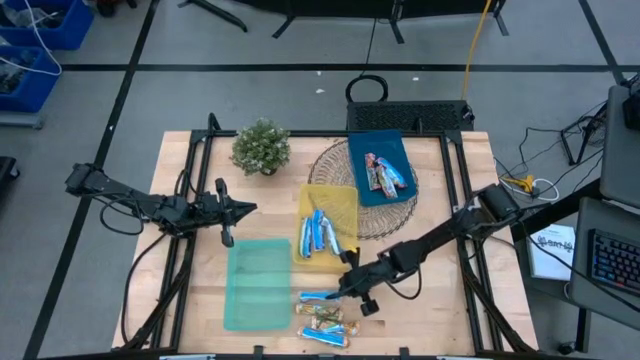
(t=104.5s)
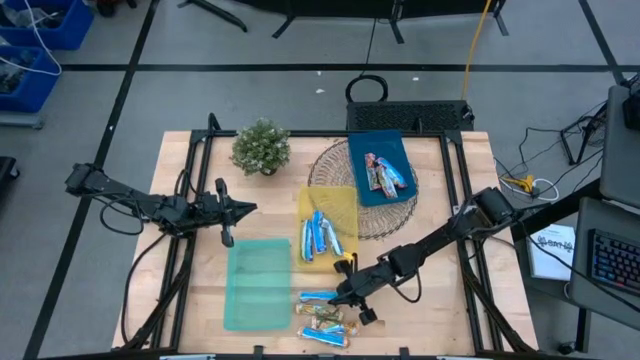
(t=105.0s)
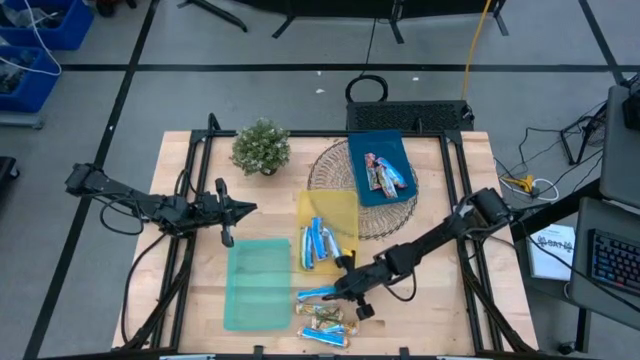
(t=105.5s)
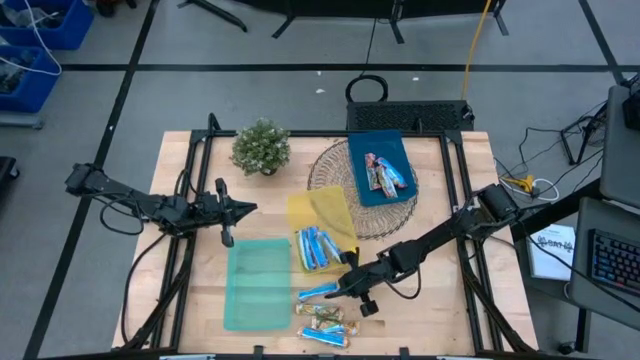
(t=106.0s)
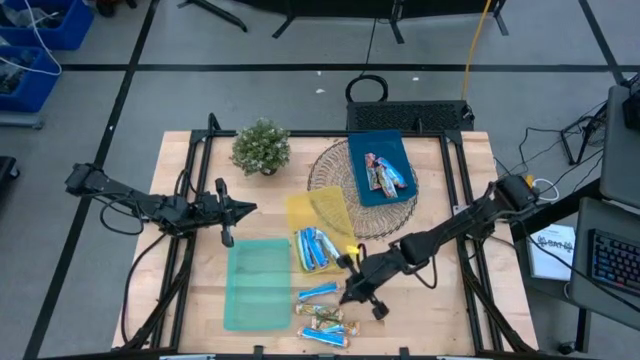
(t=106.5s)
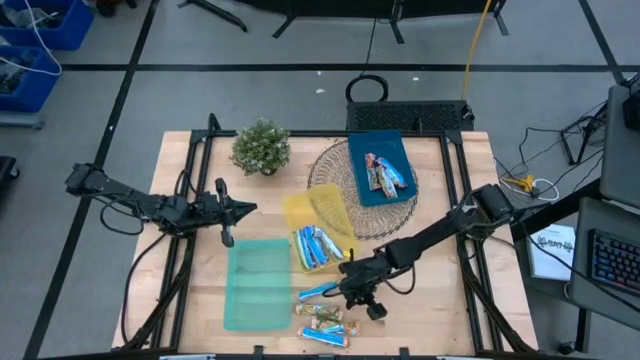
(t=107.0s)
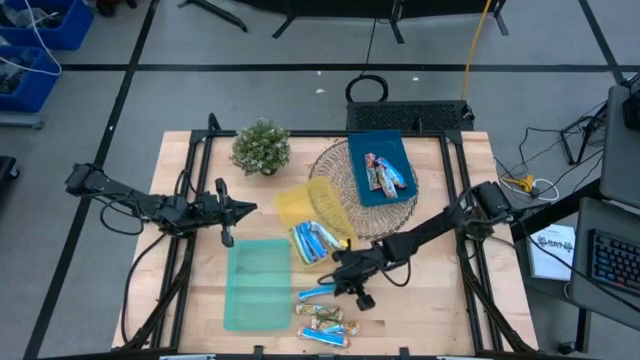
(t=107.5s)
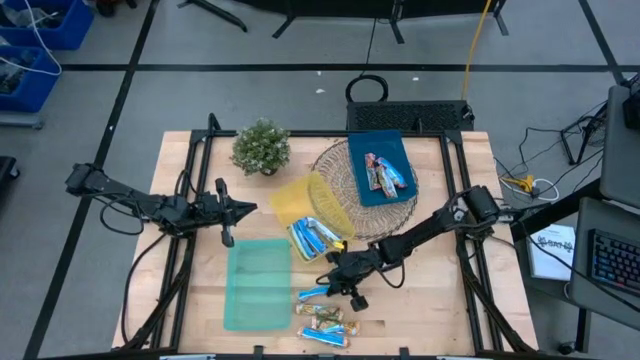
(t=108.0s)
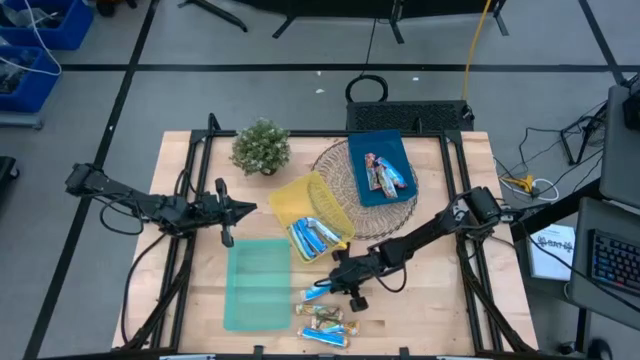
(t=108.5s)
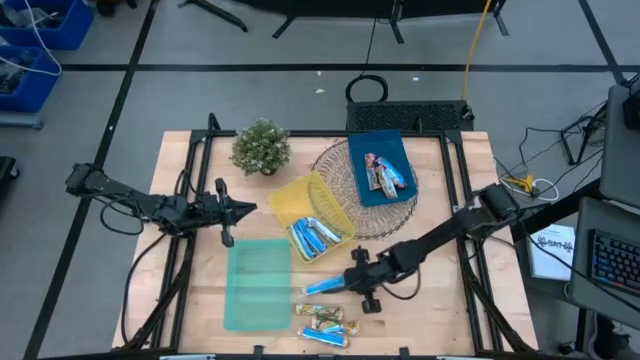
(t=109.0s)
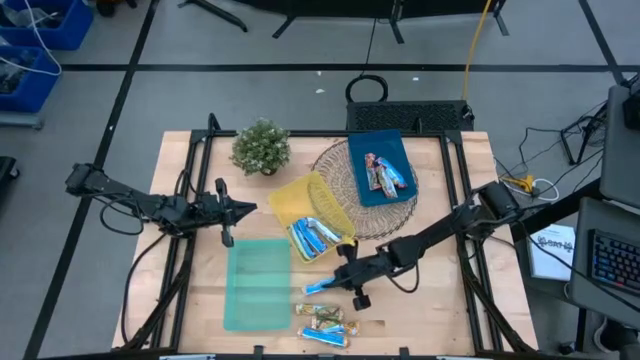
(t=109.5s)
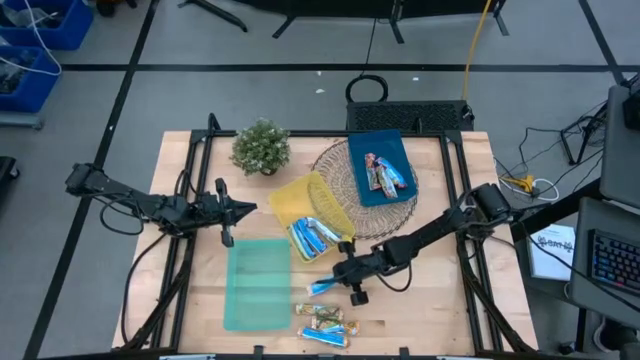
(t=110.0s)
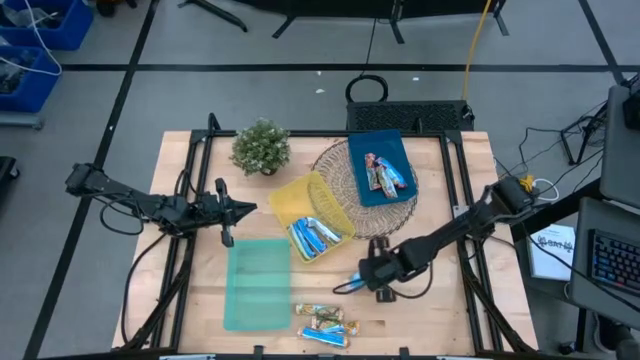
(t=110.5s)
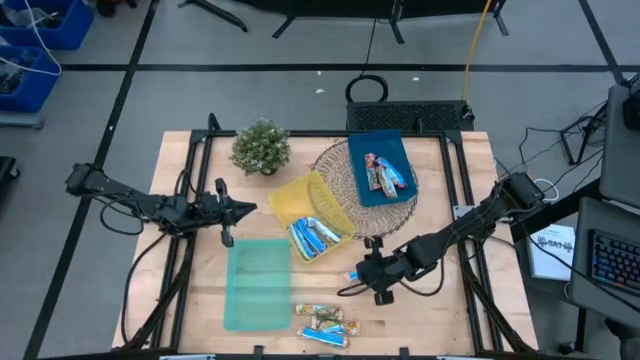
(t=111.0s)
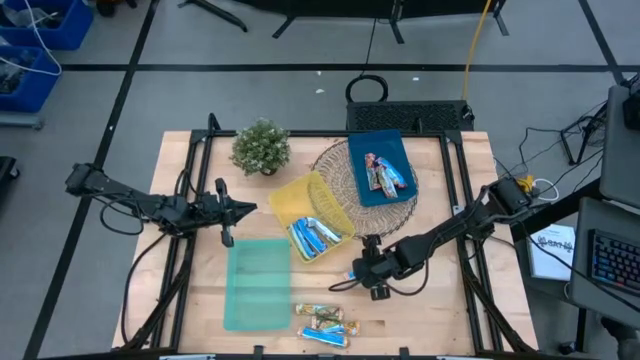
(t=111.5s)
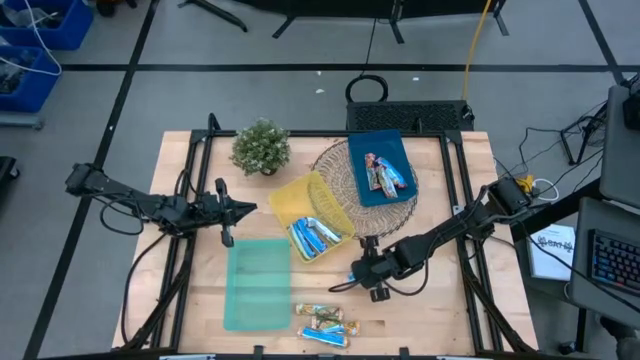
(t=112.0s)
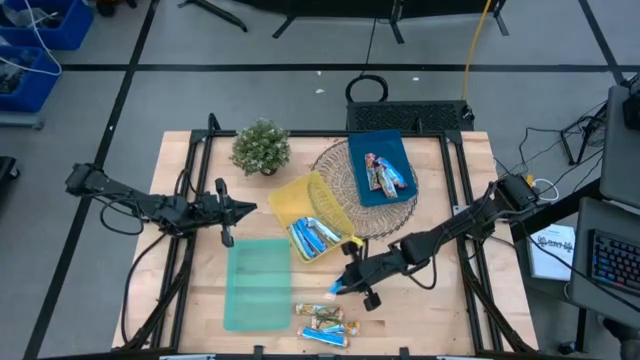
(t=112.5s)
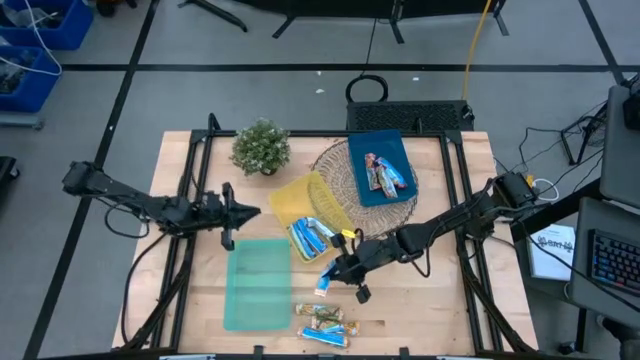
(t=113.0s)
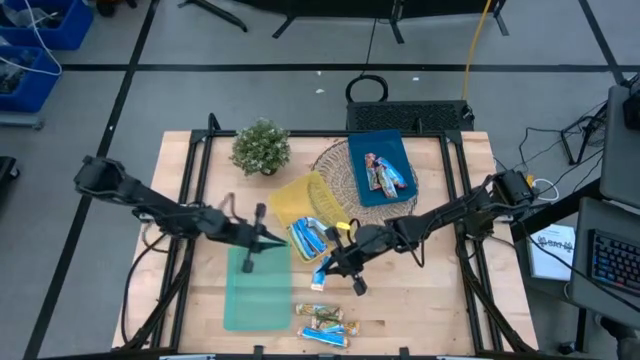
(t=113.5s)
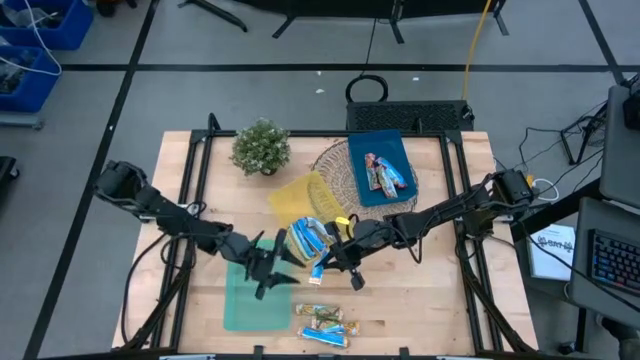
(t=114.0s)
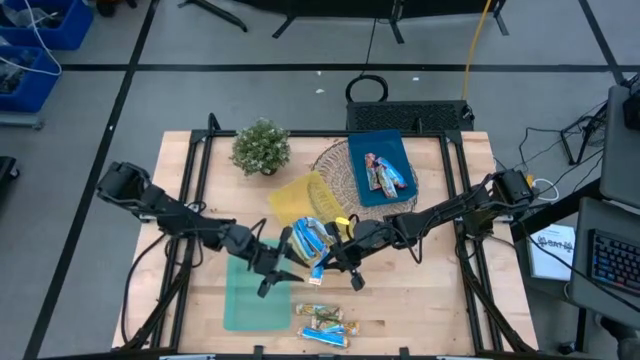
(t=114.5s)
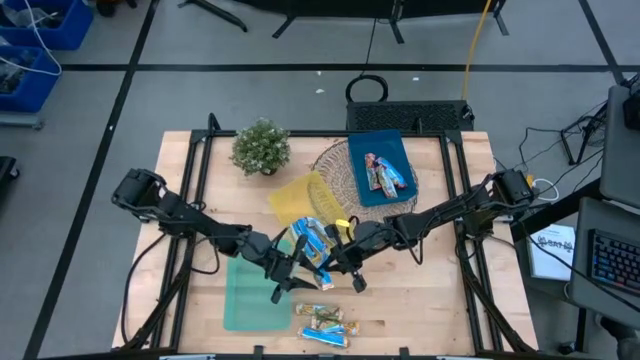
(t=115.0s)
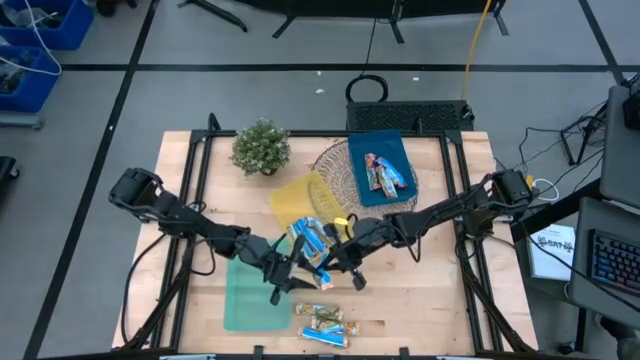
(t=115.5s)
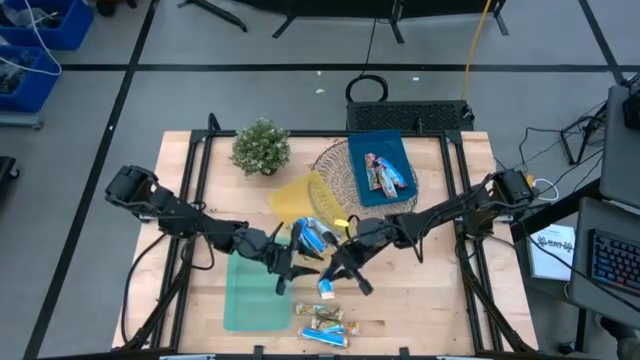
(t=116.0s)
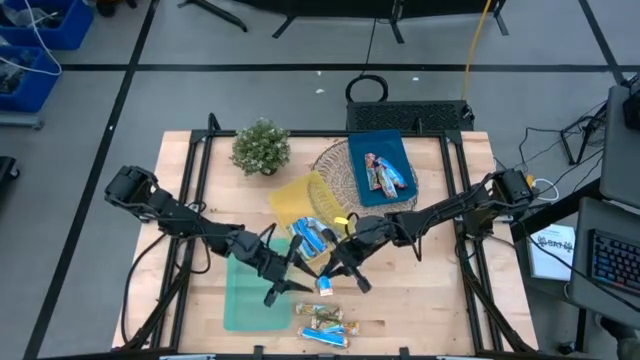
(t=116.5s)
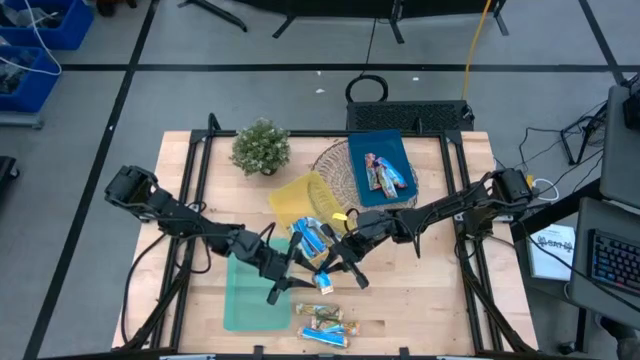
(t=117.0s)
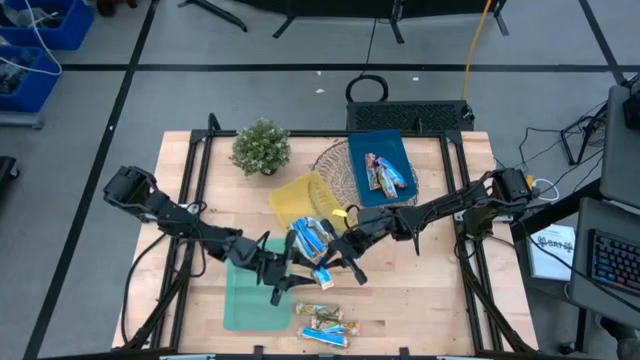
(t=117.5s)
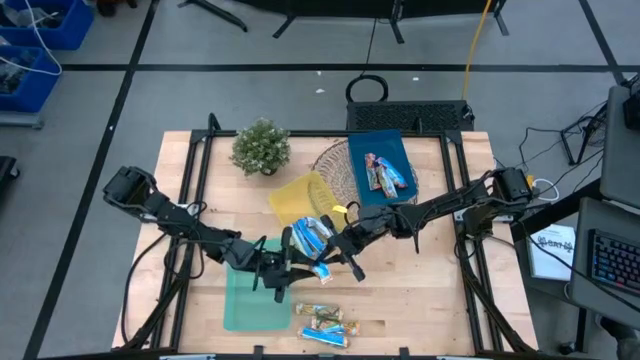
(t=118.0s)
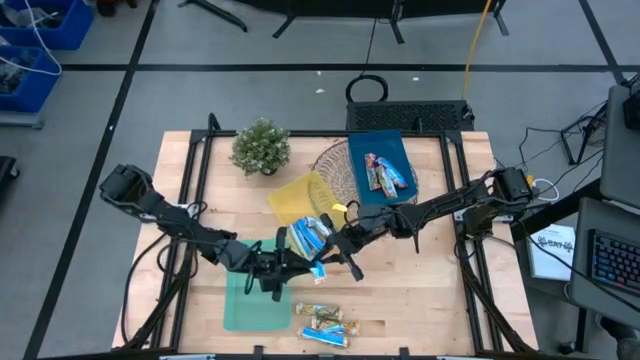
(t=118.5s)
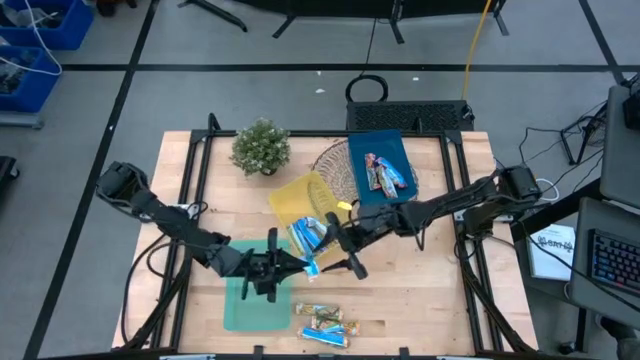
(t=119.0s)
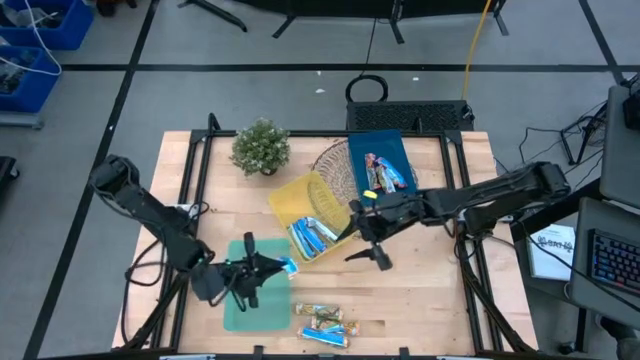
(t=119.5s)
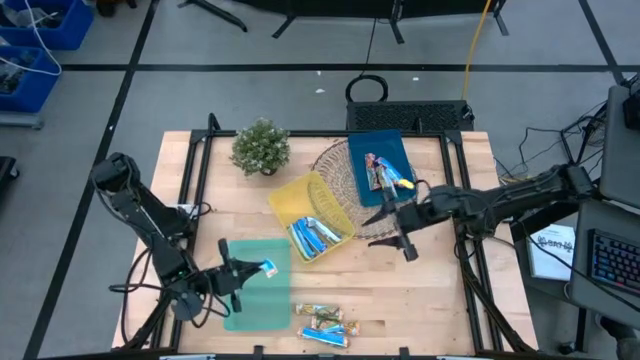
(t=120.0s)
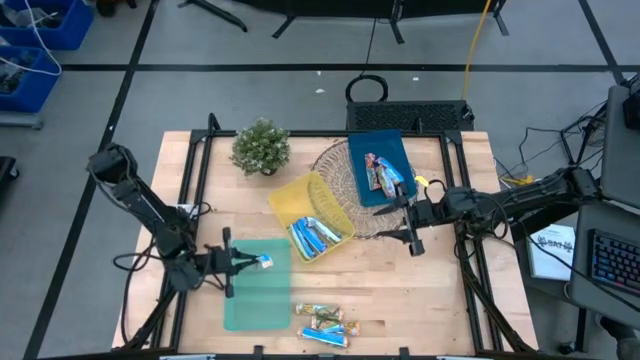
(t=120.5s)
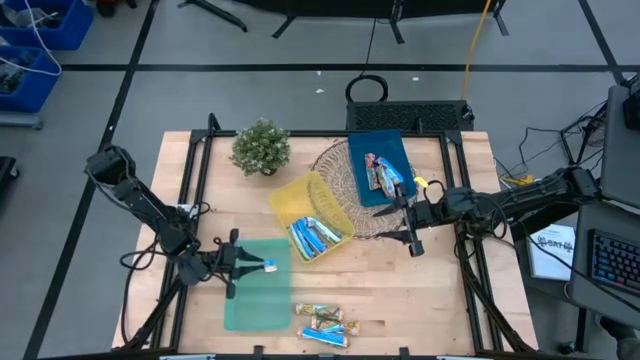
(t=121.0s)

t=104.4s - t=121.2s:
Task: Pick and place Granola Bars by type
Put the yellow granola bar into the green bin

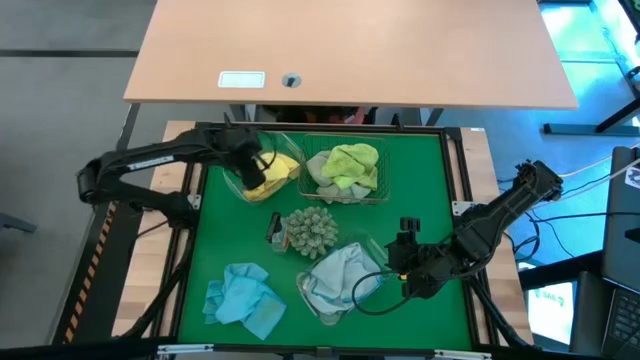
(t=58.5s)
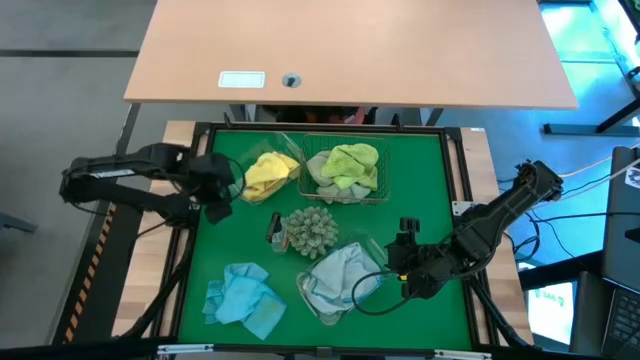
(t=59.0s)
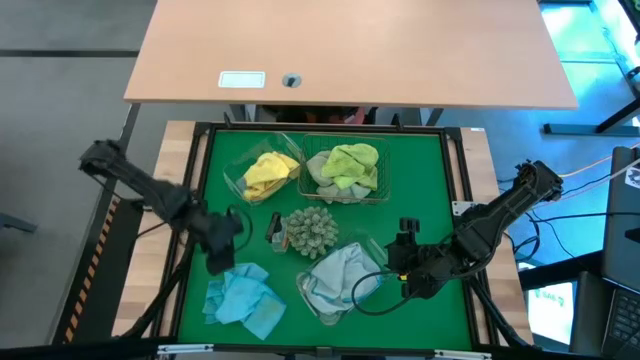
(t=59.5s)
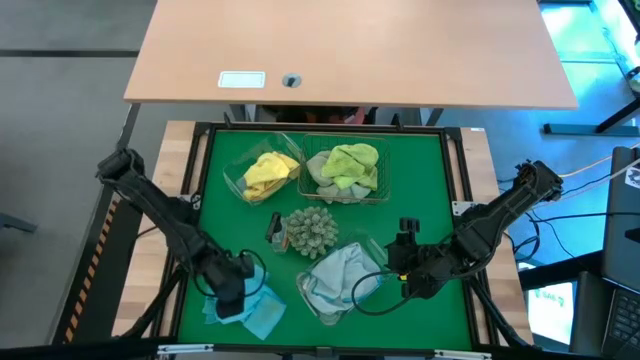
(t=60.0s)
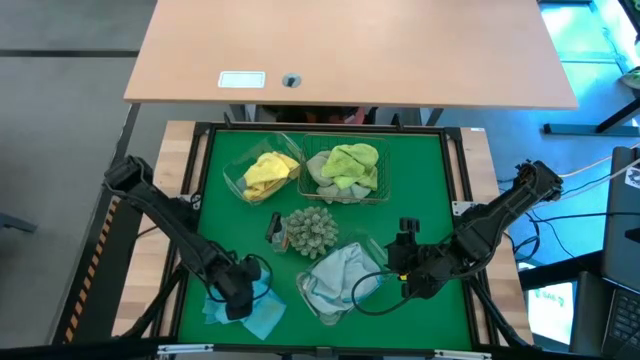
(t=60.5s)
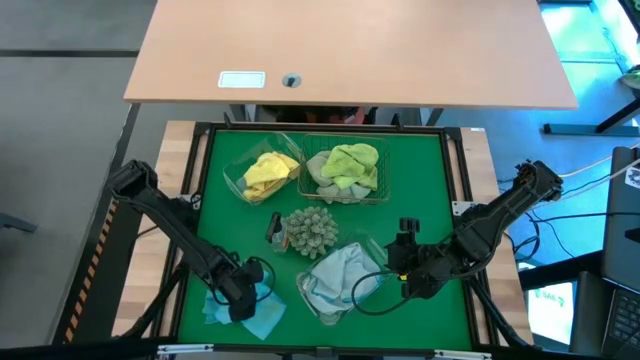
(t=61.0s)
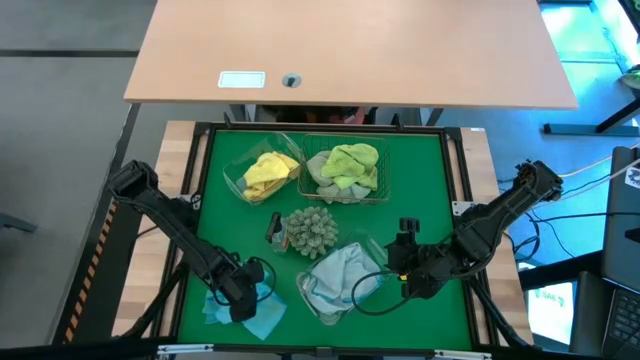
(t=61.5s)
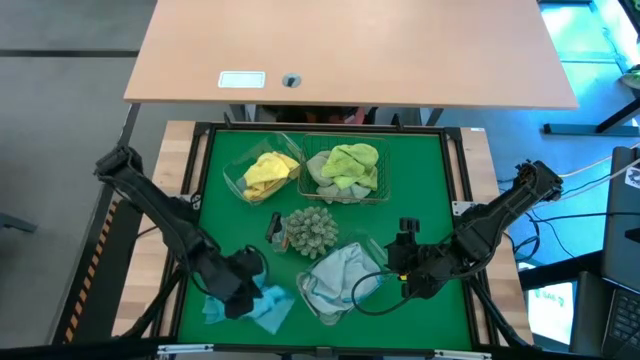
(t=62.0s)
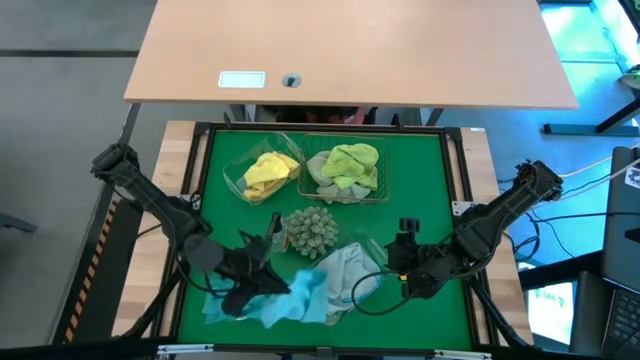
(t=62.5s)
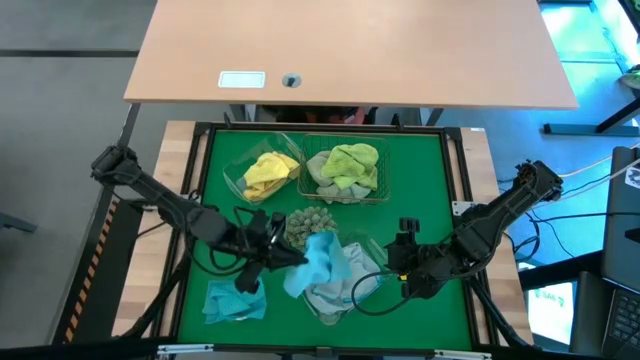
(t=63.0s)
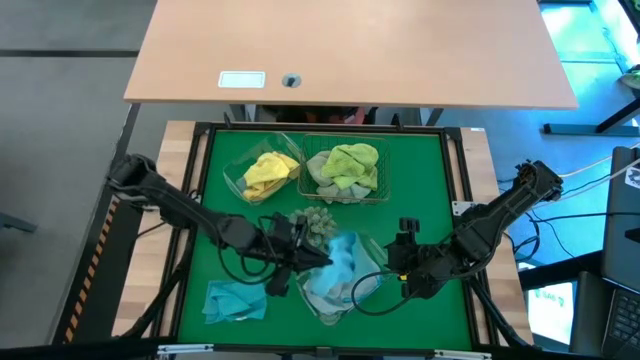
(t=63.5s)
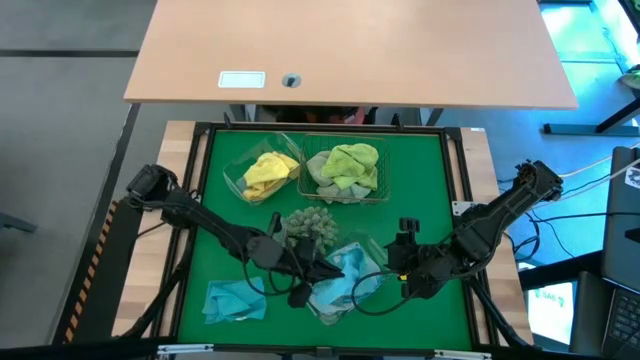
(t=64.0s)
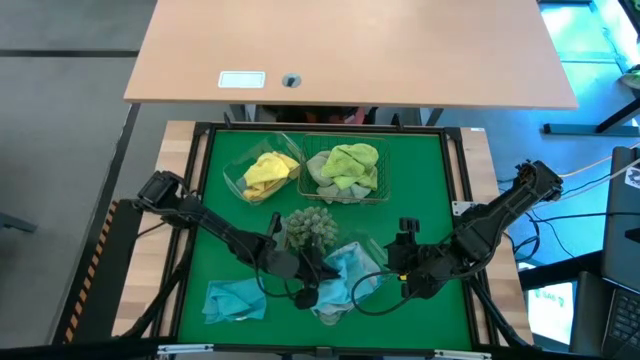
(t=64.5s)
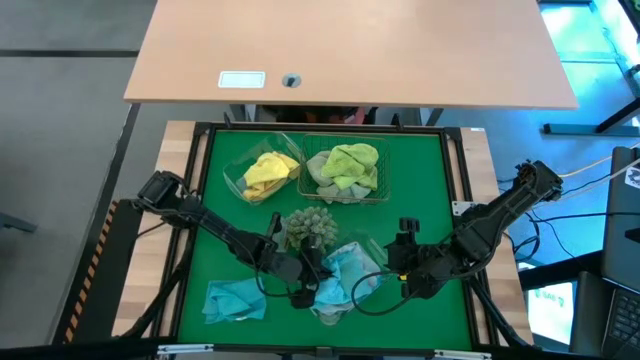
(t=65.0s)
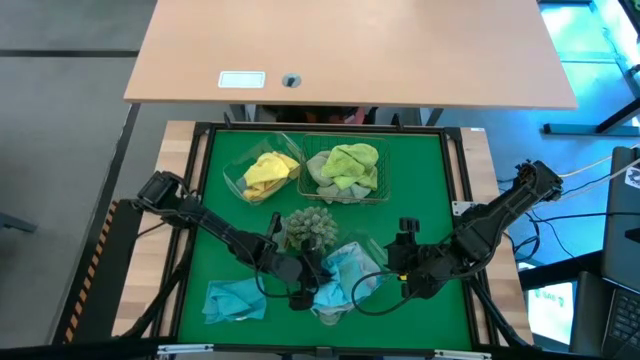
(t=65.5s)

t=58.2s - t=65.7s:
Task: Sort microfiber towel by color & place in baskets
Put the right blue microfiber towel into the bottom transparent bin
